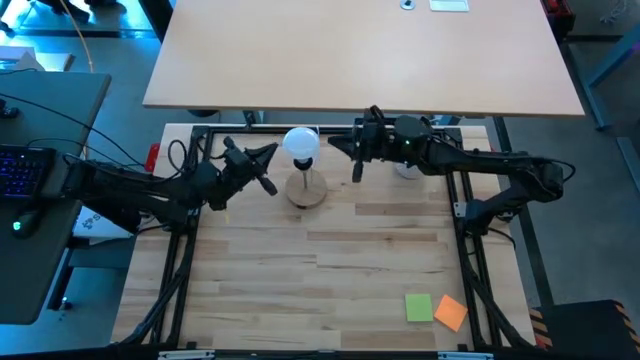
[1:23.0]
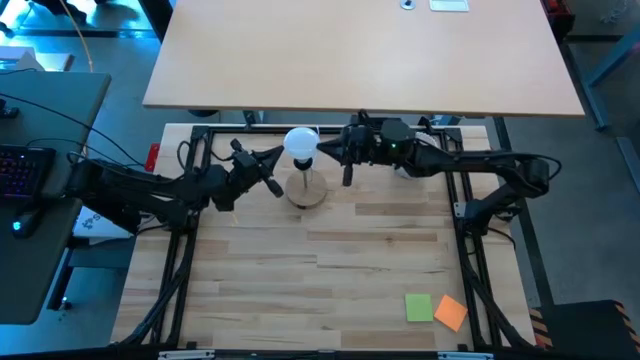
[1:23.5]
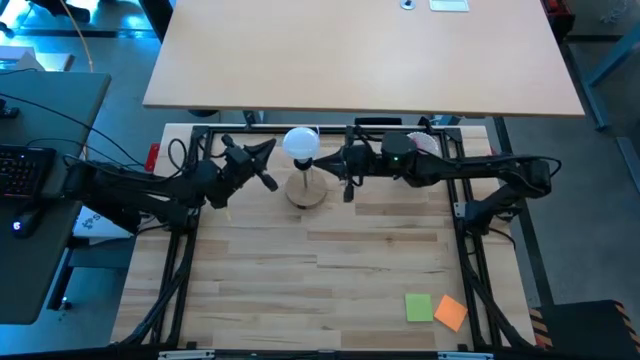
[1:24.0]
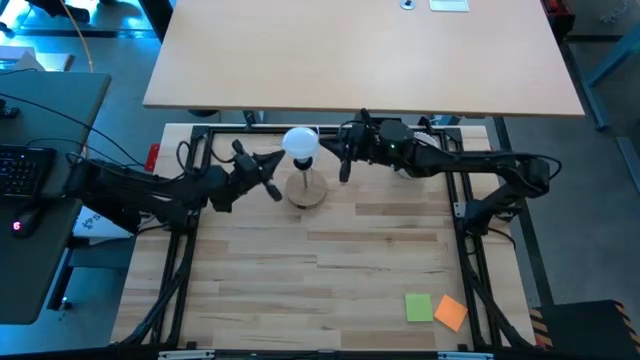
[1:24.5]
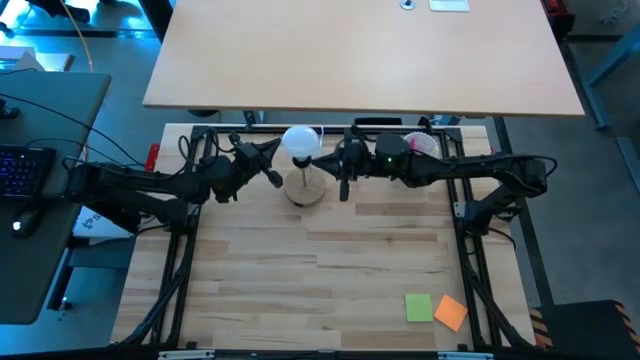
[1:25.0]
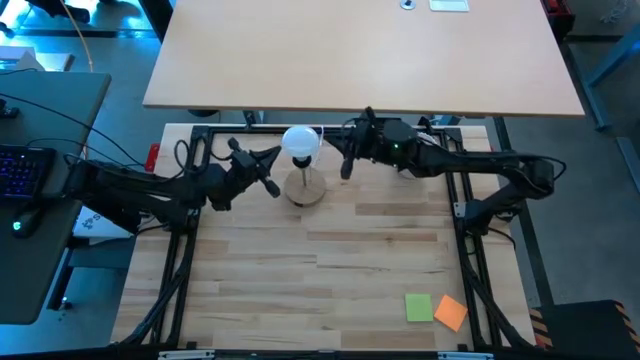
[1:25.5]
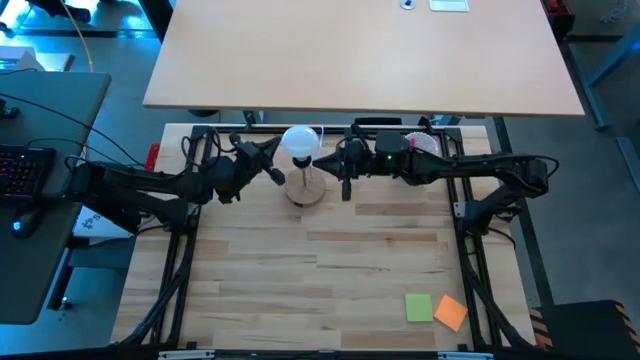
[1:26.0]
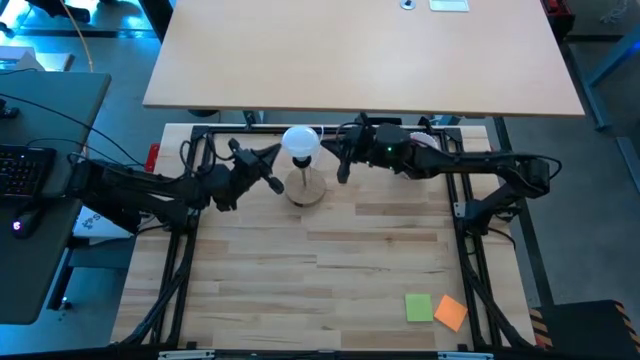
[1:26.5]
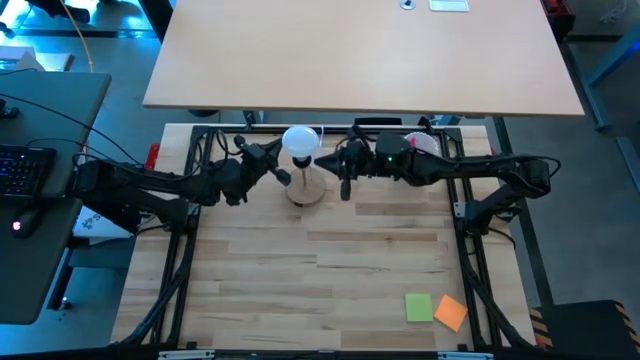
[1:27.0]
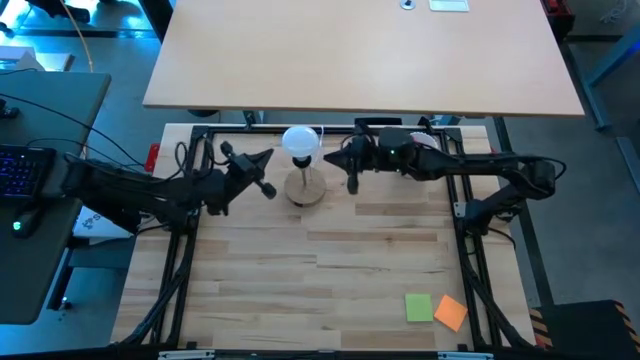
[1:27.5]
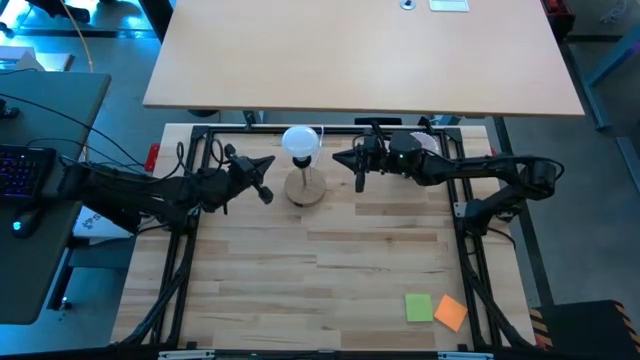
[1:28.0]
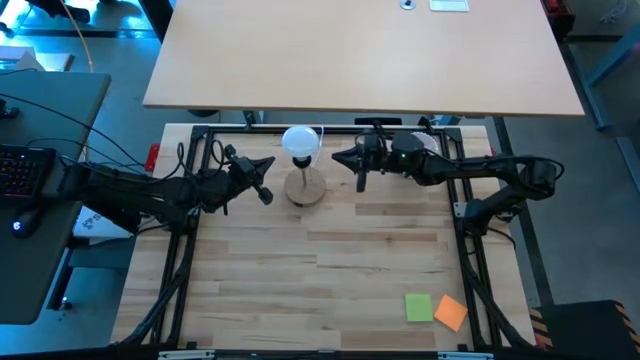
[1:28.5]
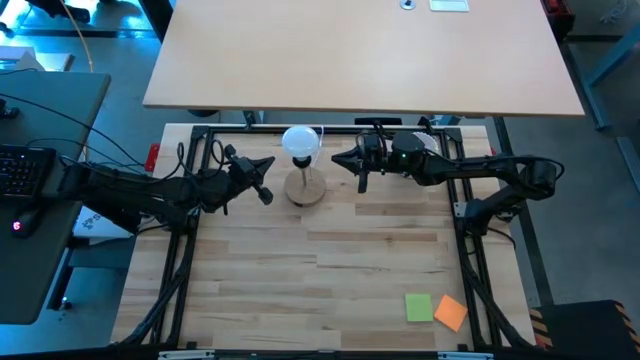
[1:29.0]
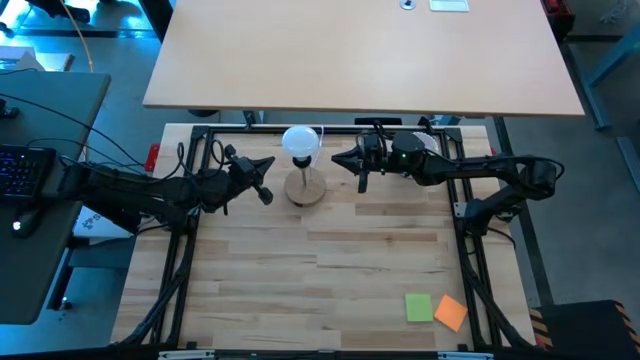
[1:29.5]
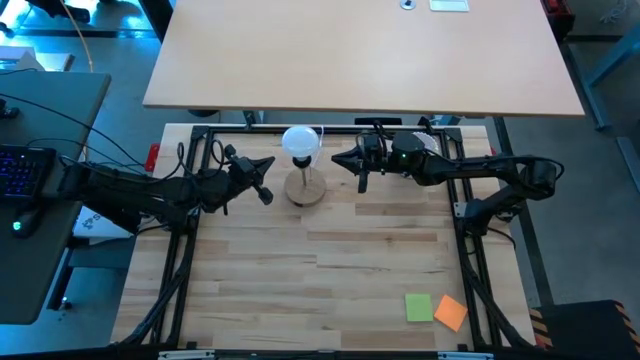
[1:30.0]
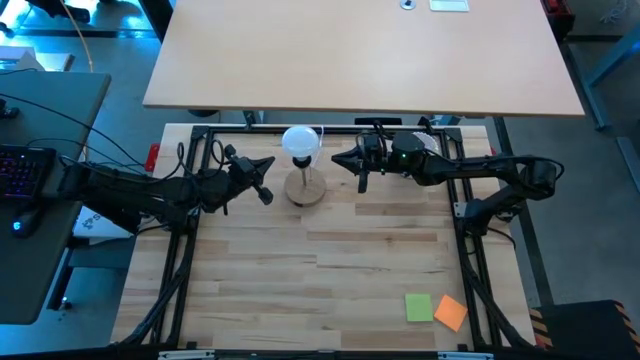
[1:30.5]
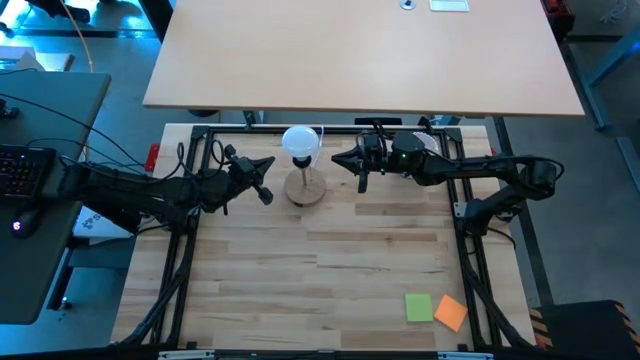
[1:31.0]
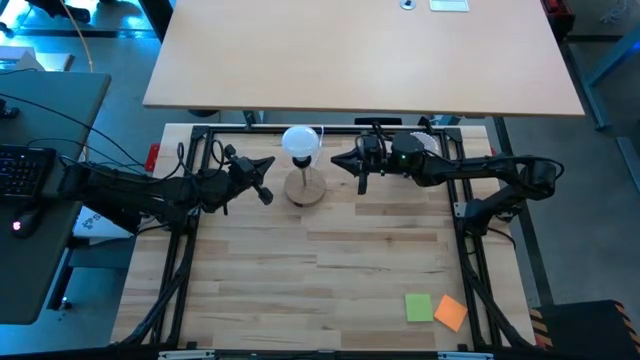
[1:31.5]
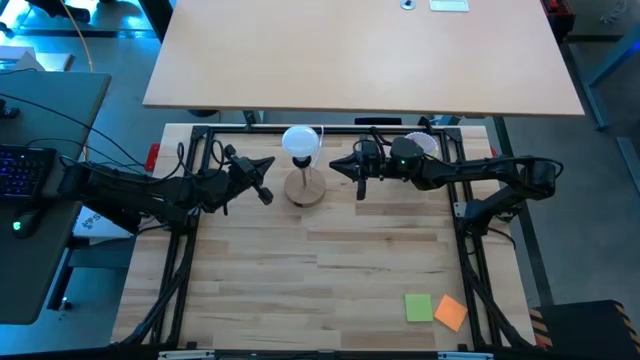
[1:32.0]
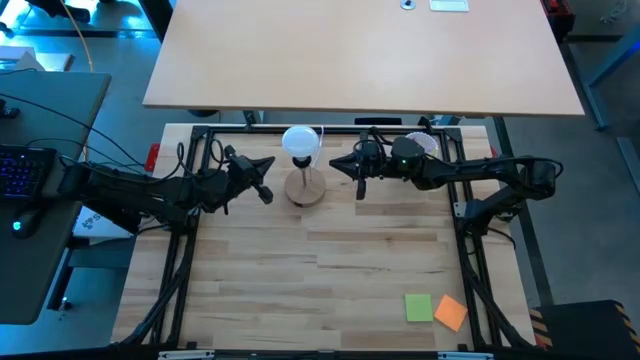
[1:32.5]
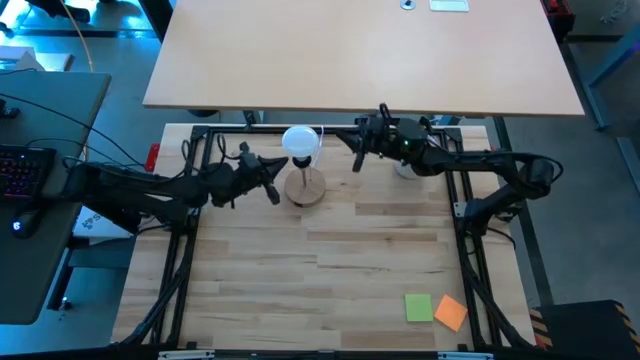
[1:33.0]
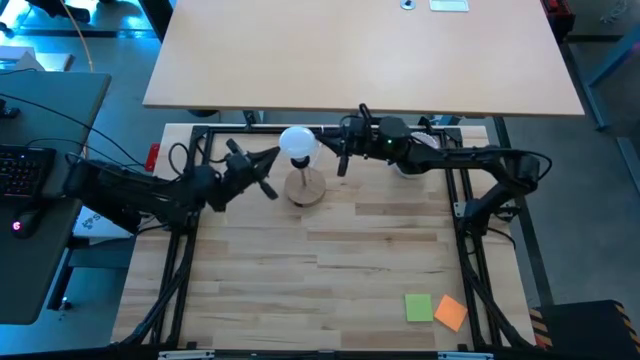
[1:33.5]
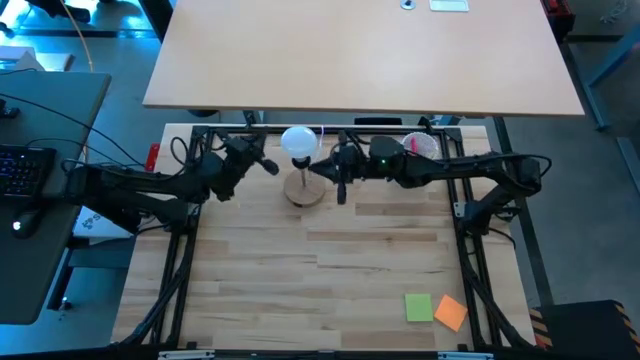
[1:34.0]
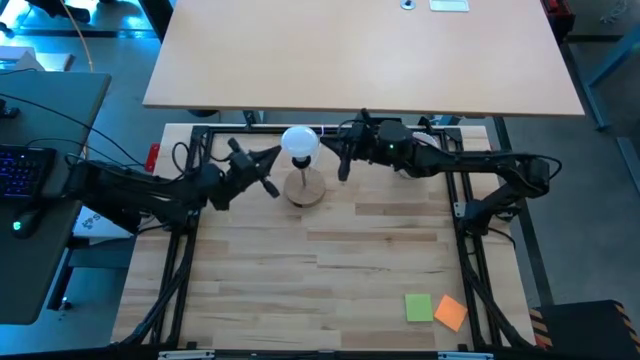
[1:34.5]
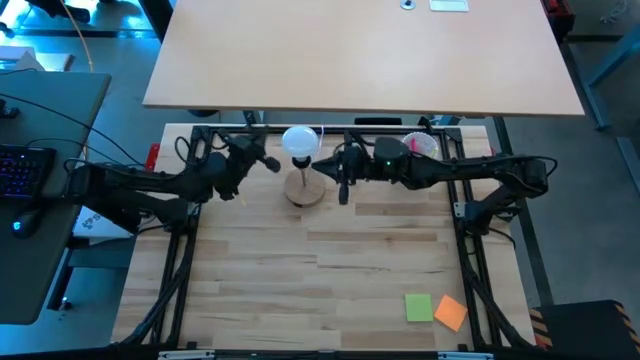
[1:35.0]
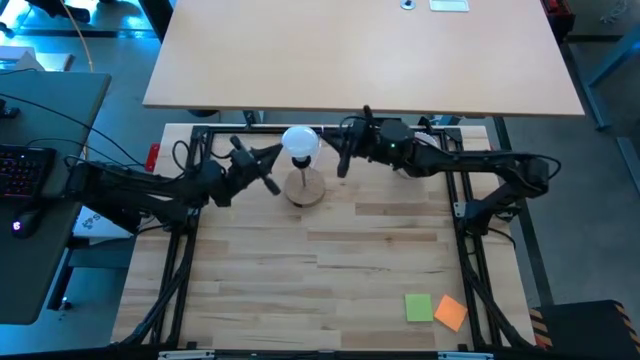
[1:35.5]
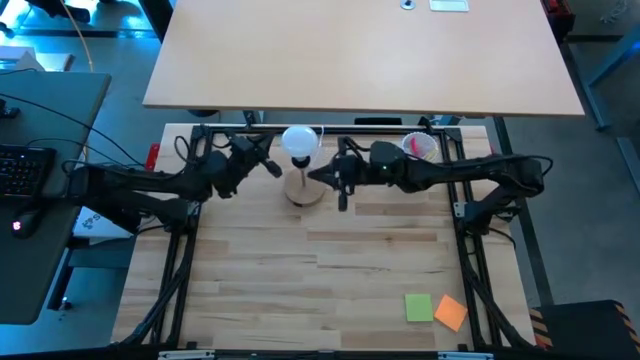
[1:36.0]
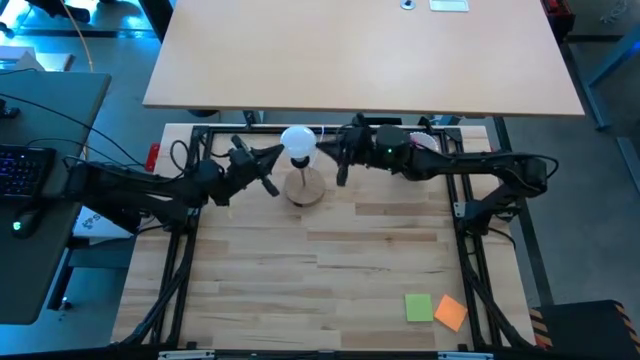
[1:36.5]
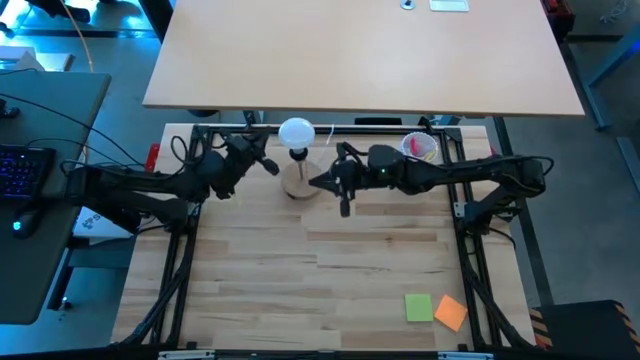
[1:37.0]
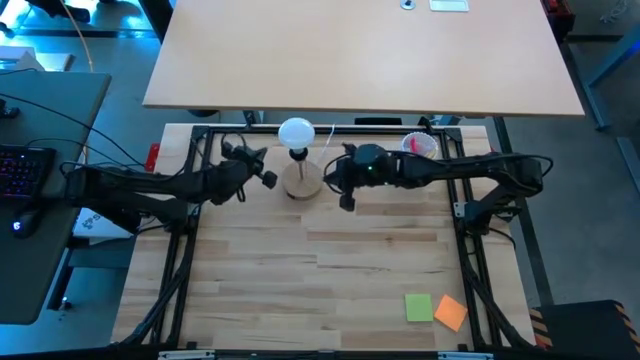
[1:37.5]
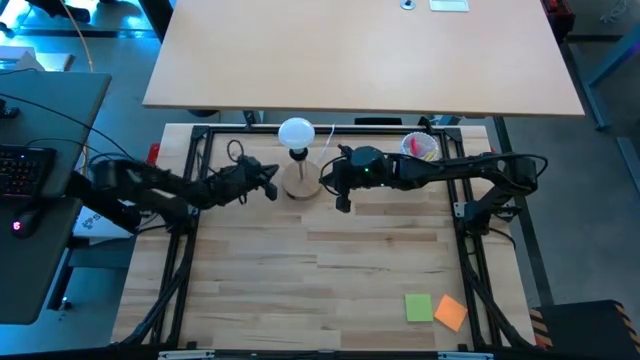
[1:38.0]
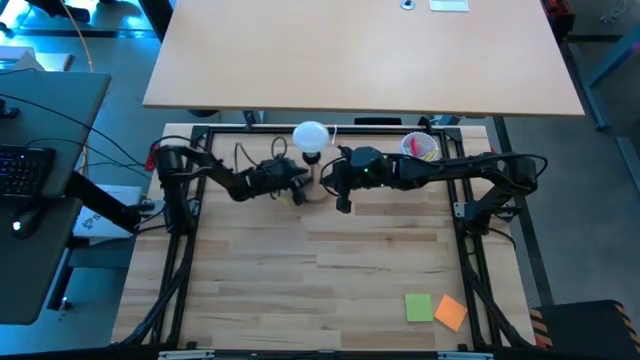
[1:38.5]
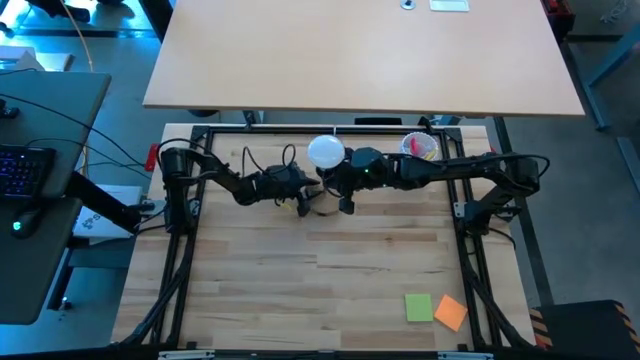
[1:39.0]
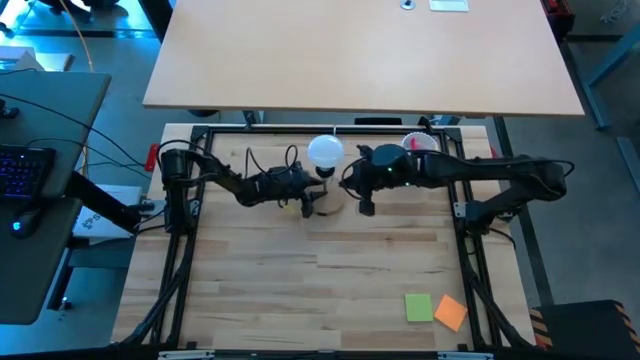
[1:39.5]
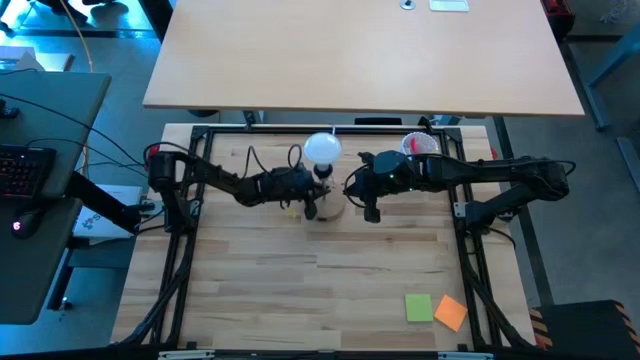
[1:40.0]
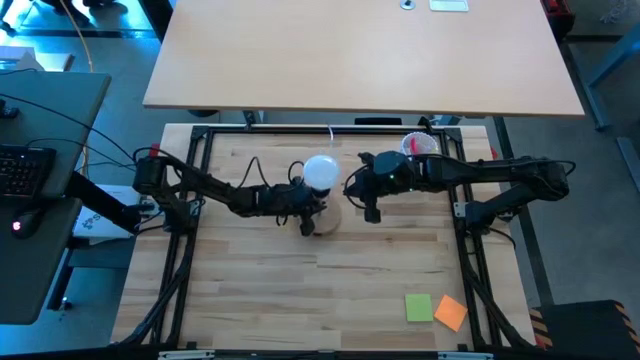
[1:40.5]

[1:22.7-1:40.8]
Task: Screw lightbulb
Insert the lightbulb into the brown lamp

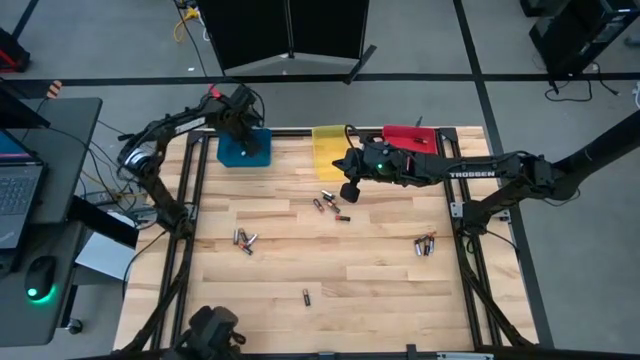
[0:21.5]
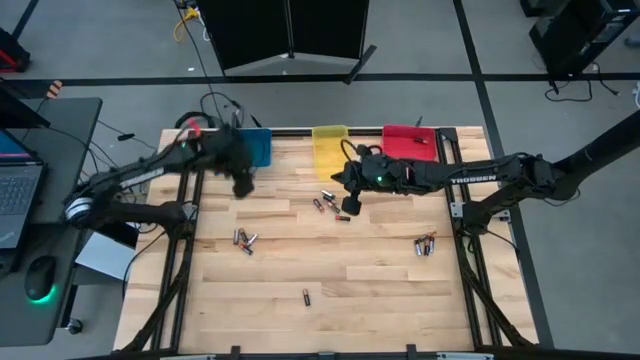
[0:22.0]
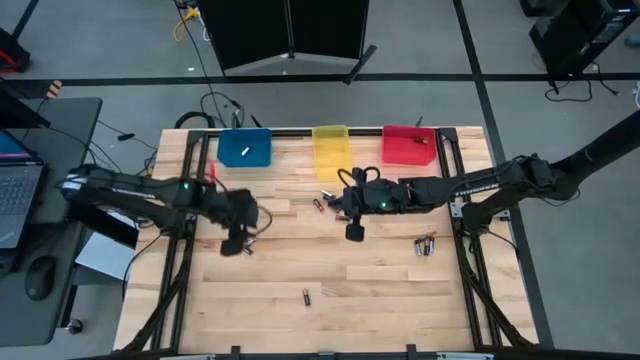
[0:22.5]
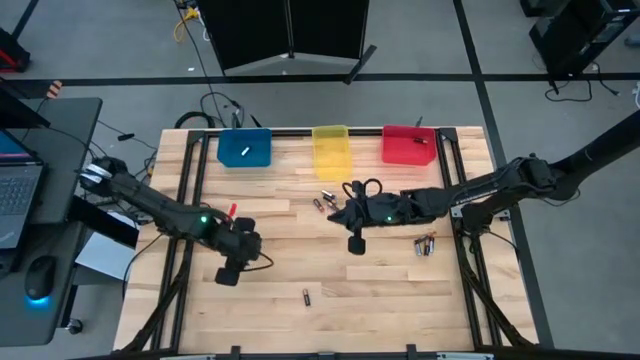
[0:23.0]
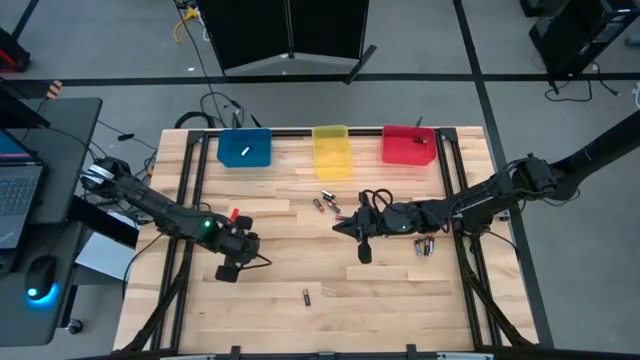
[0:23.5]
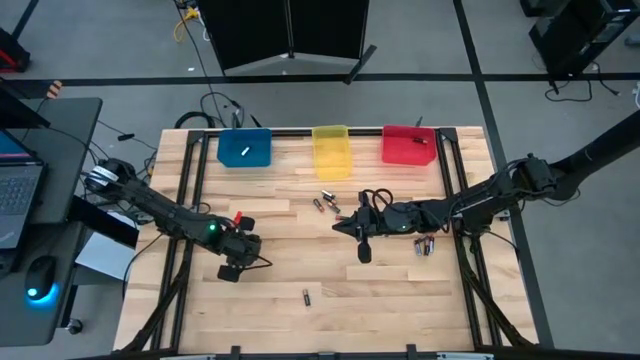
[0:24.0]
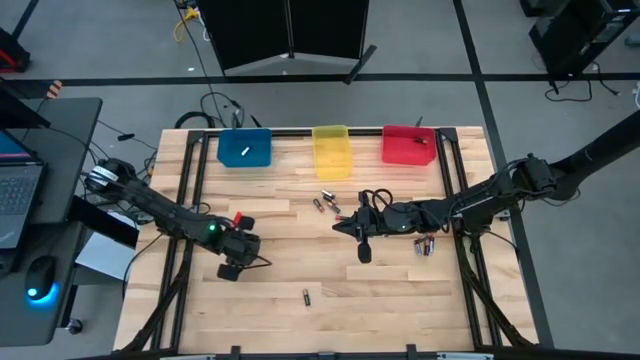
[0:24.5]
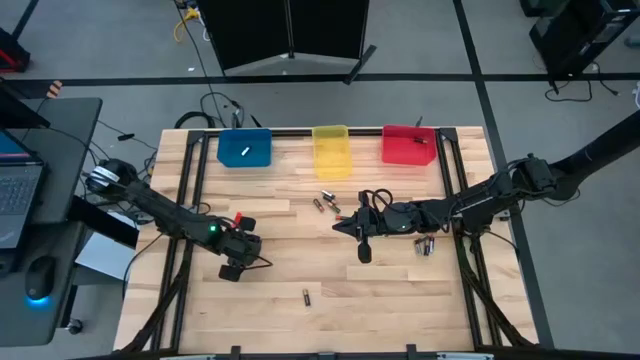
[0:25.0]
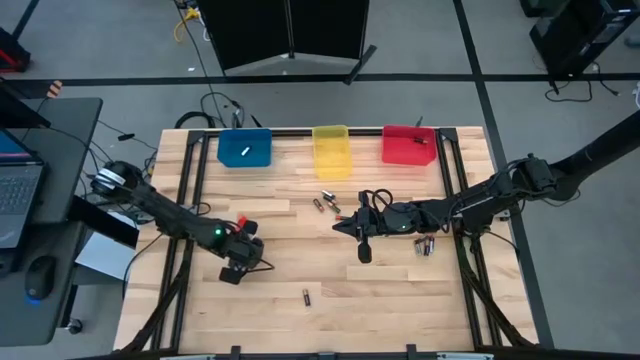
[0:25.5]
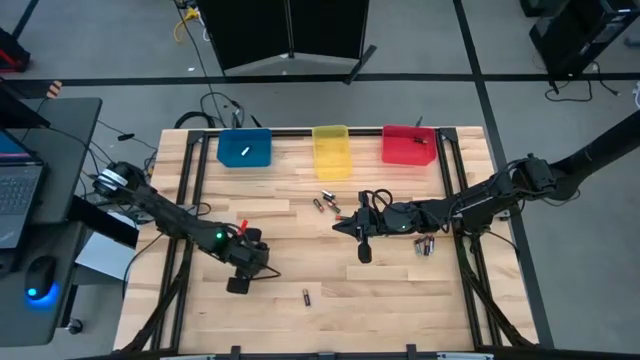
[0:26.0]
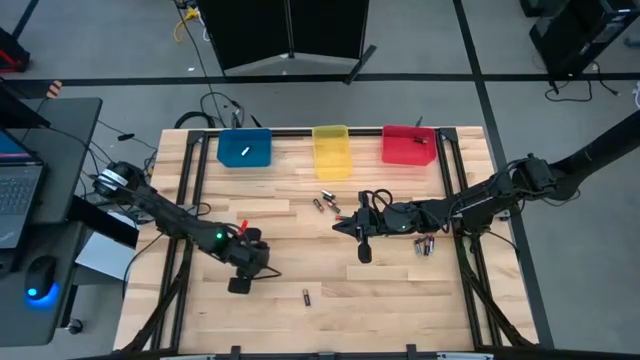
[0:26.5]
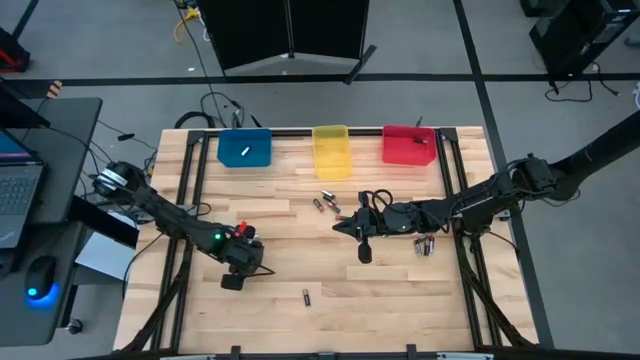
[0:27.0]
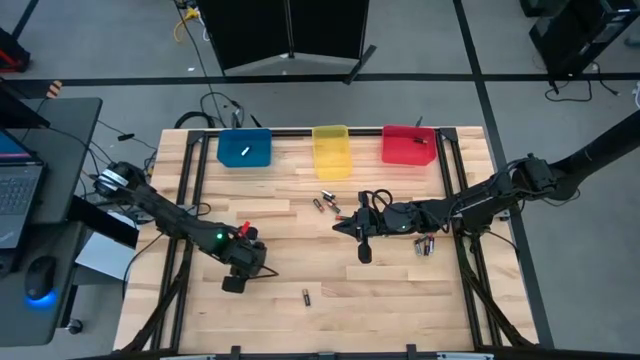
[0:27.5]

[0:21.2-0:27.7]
Task: Sort batteries
Put the black red battery into the yellow bin
